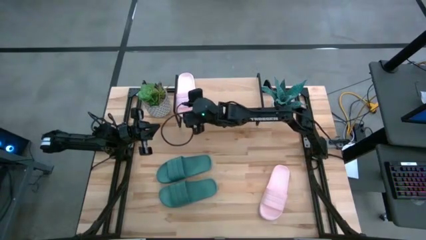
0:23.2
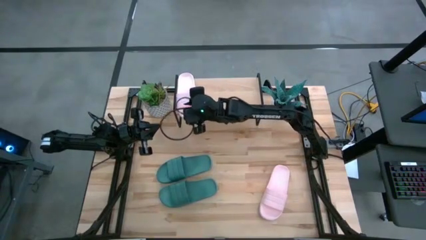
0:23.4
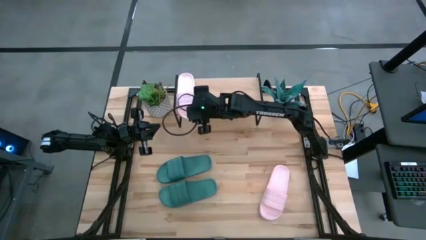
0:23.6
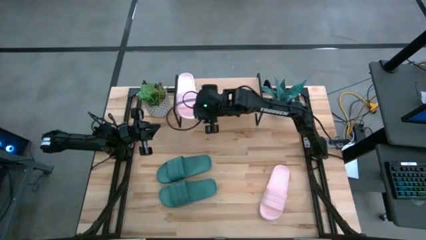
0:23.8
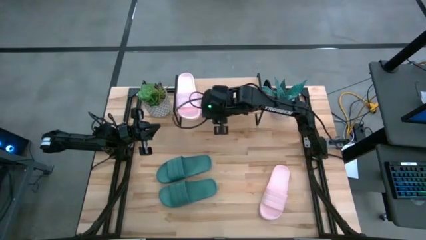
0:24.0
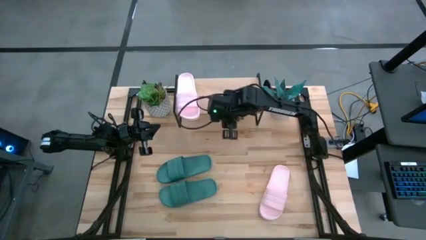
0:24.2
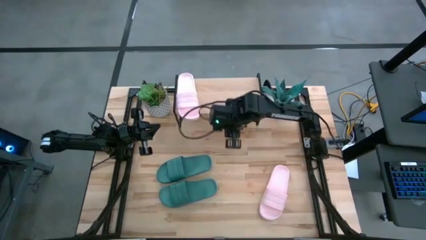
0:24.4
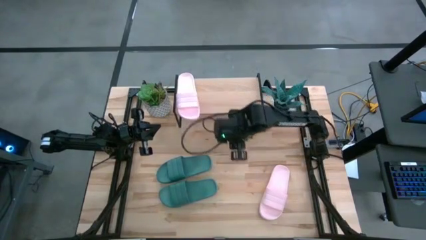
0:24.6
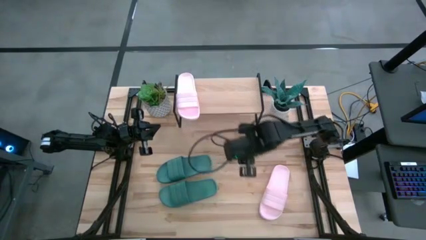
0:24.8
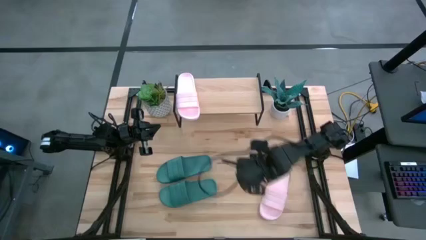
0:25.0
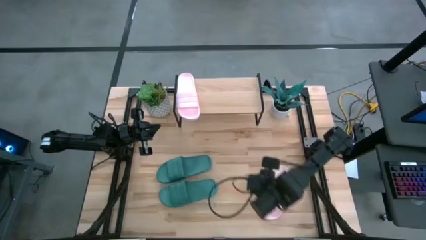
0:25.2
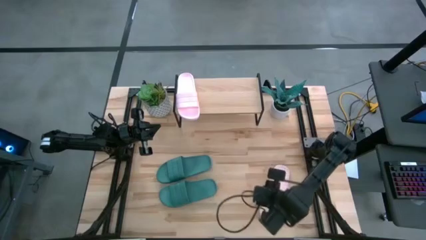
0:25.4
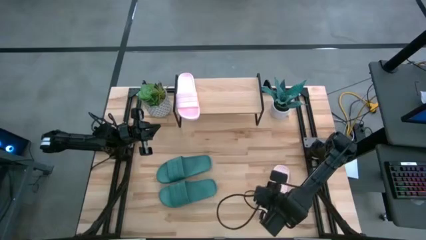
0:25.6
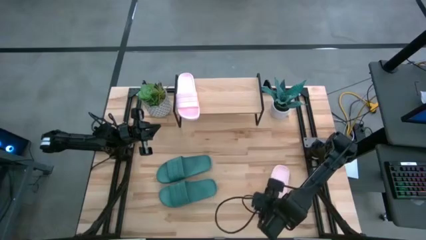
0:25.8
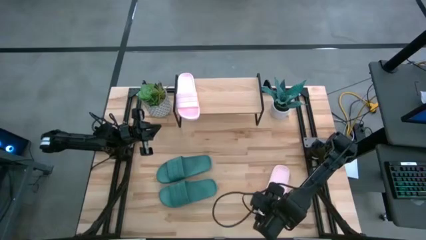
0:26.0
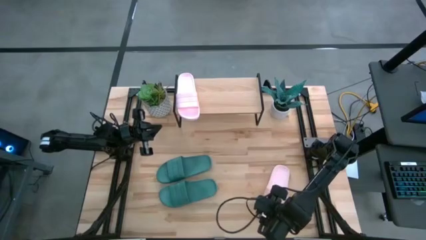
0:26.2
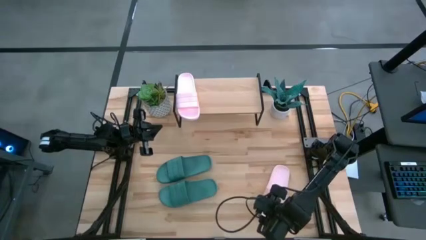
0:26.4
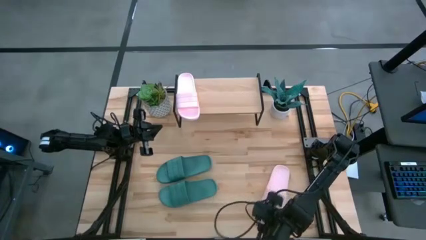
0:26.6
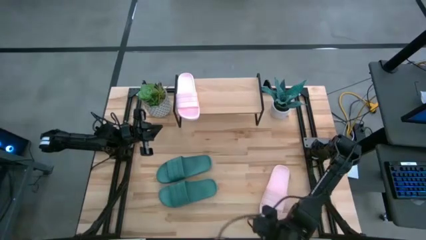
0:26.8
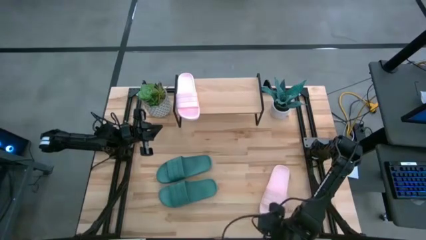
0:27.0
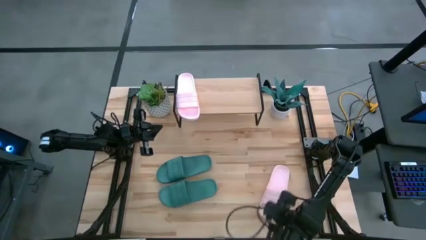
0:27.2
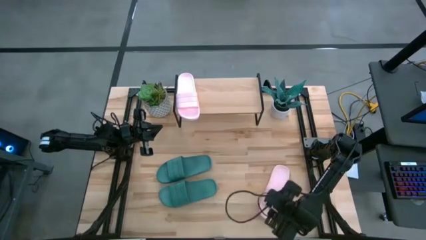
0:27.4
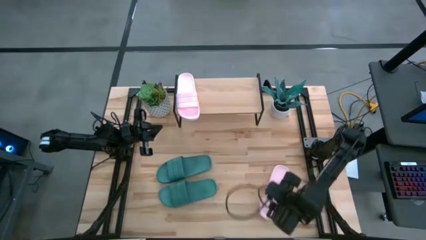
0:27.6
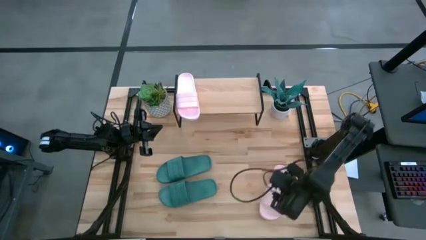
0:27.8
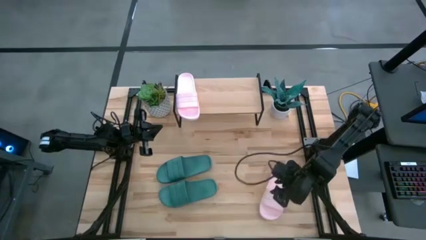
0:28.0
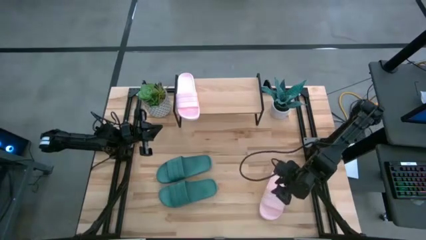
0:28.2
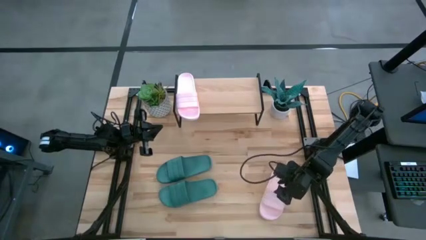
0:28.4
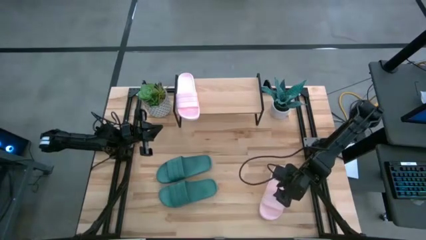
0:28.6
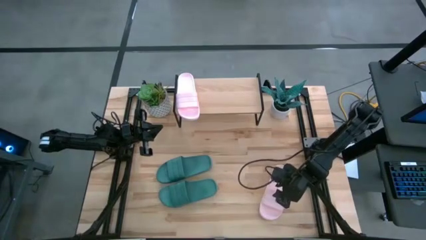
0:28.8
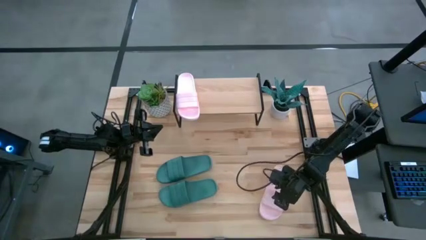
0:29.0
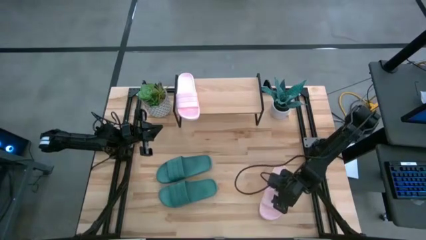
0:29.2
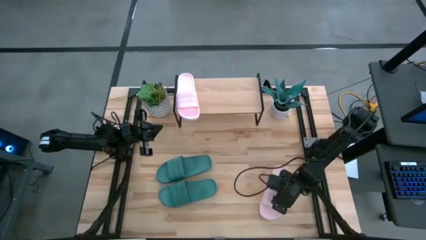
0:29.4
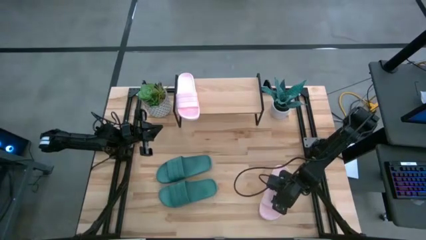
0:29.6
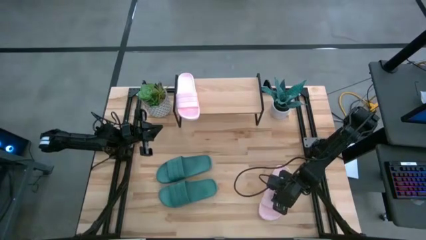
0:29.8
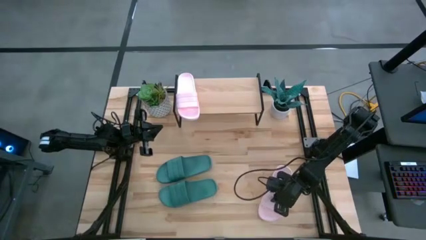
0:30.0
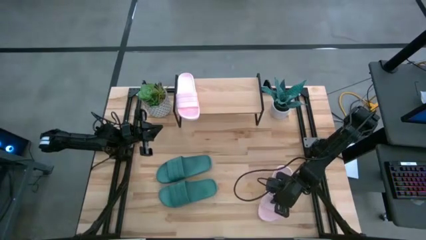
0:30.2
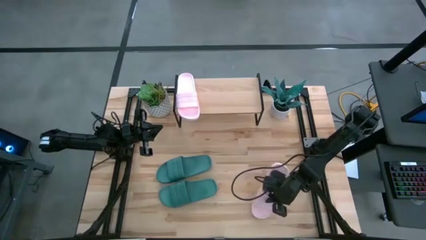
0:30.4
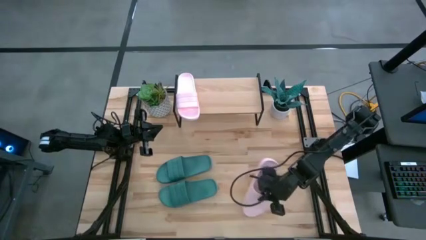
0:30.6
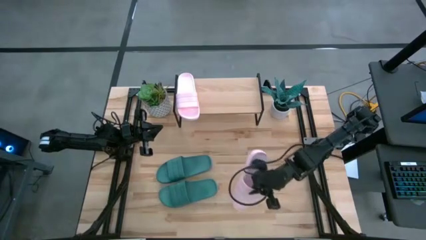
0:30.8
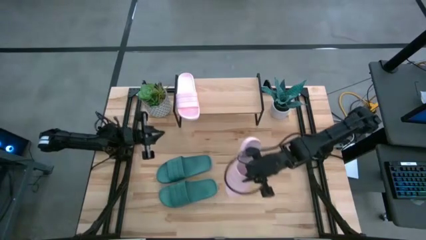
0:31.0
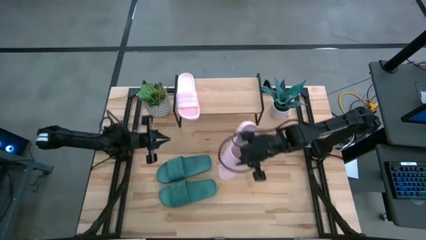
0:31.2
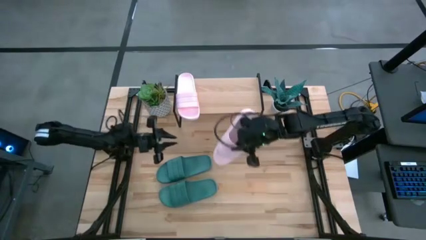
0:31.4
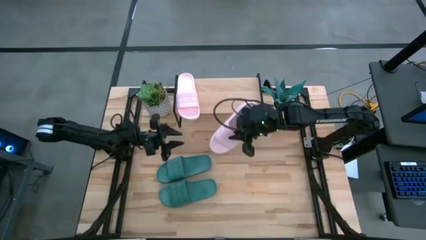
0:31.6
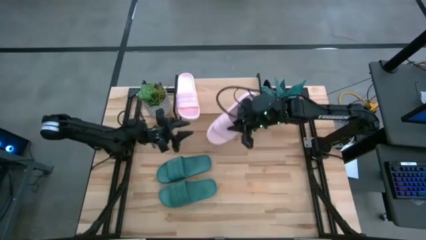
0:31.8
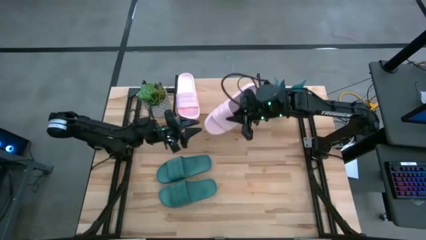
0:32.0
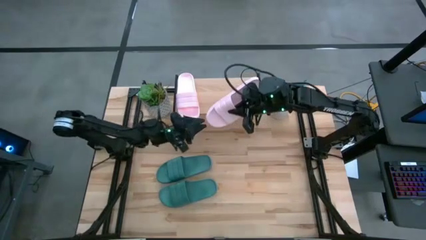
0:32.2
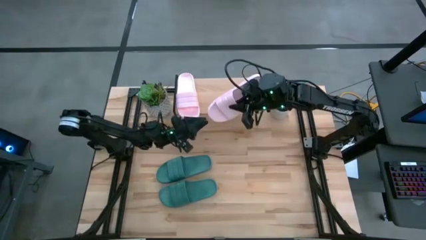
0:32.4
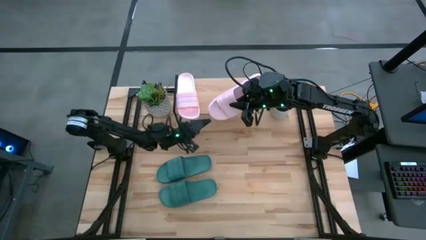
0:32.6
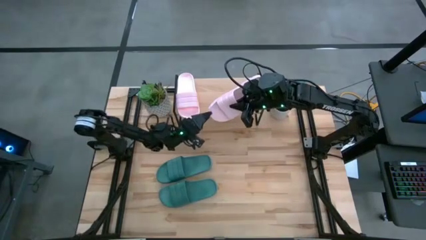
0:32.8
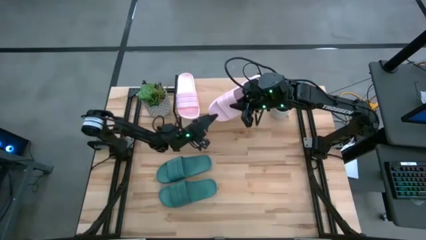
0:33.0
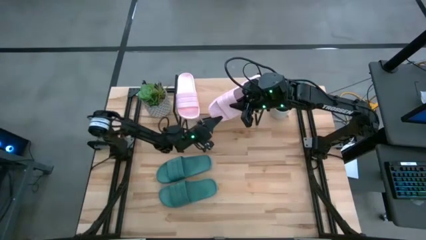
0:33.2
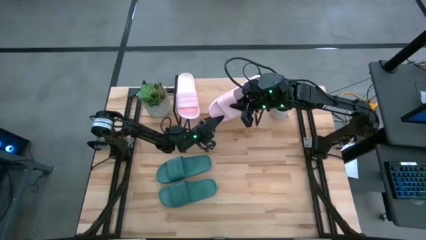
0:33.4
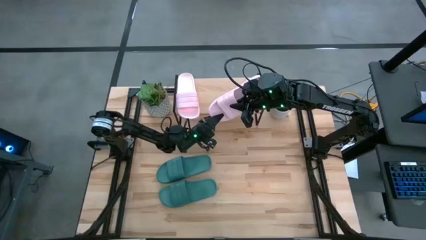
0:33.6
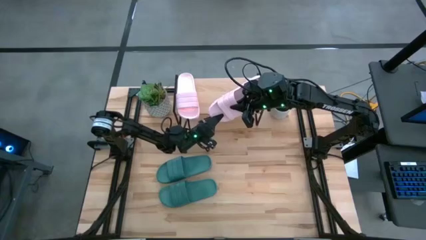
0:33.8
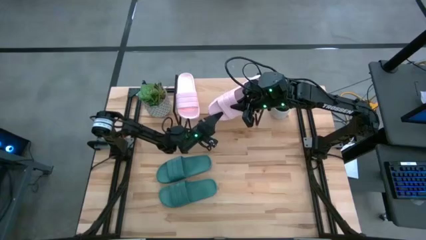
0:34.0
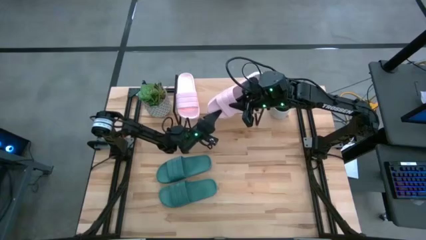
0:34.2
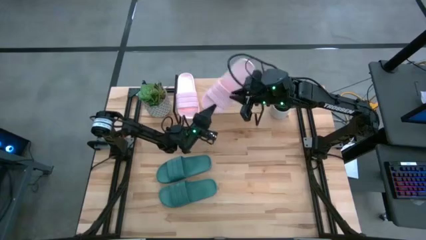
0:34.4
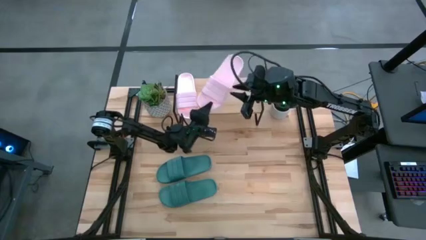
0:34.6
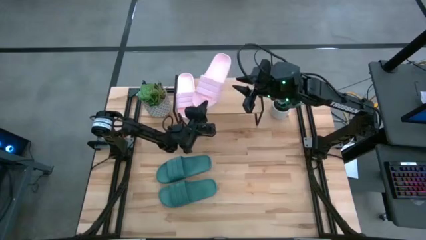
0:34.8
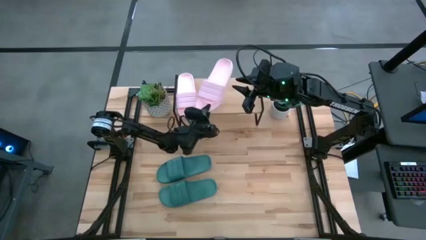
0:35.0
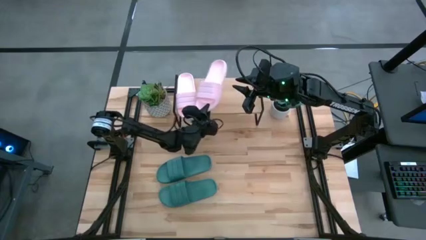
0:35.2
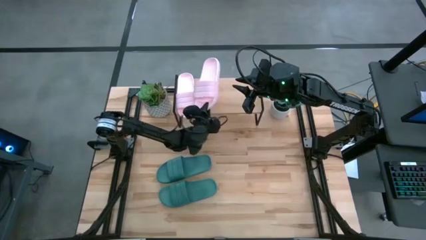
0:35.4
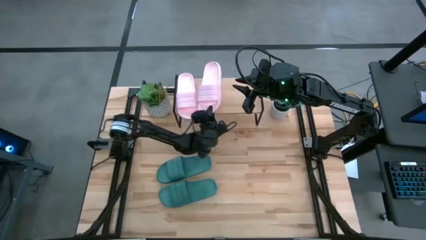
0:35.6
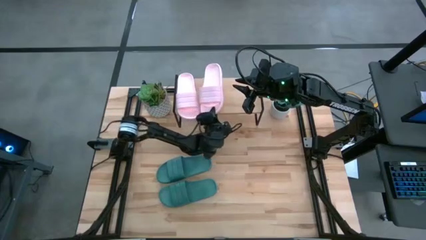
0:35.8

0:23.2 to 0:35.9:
Task: Pick and place slides into the shelf
Put the pink slipper on the shelf
